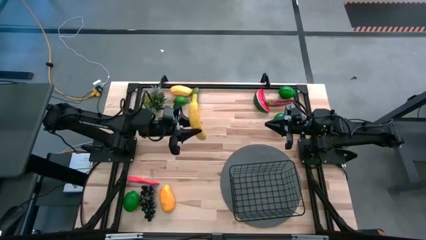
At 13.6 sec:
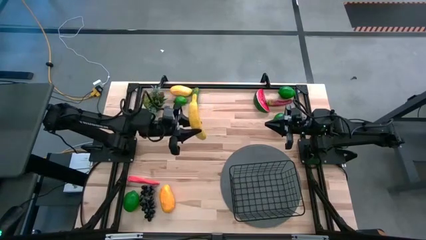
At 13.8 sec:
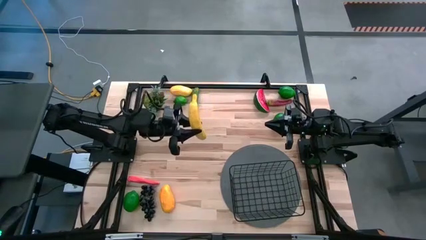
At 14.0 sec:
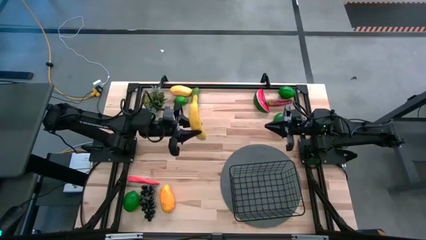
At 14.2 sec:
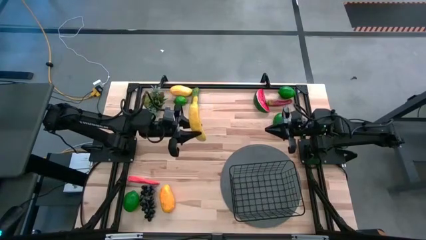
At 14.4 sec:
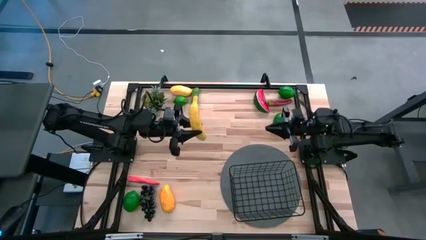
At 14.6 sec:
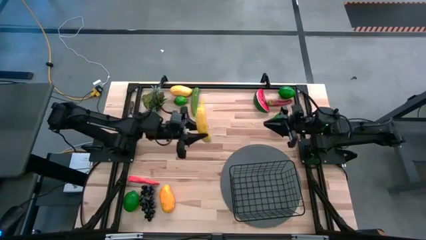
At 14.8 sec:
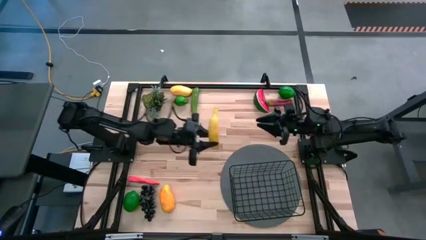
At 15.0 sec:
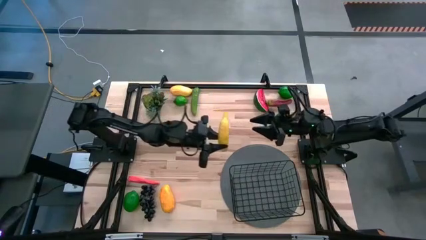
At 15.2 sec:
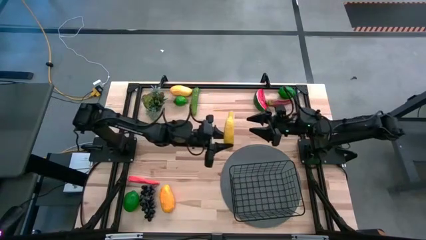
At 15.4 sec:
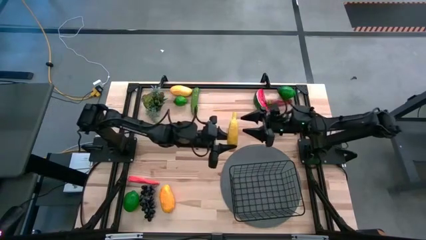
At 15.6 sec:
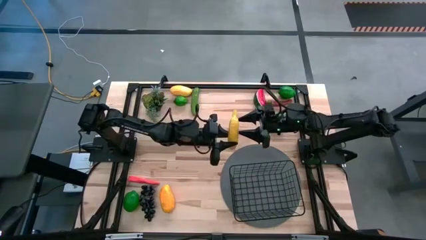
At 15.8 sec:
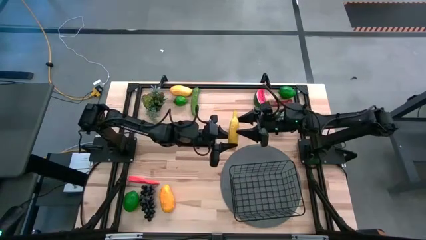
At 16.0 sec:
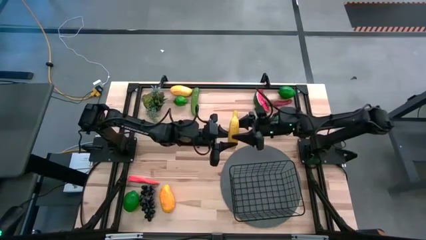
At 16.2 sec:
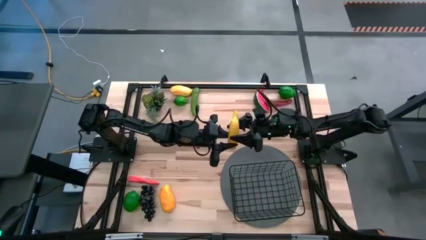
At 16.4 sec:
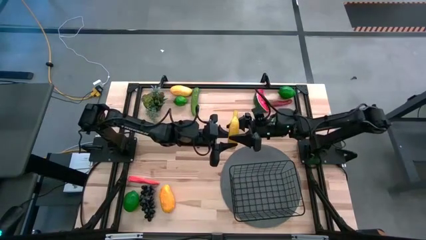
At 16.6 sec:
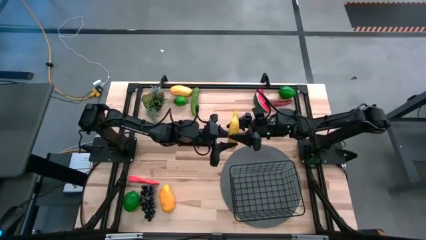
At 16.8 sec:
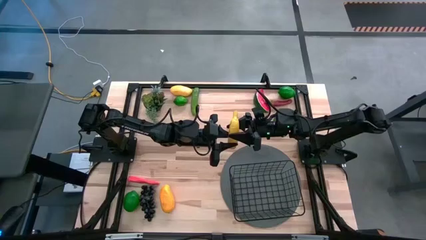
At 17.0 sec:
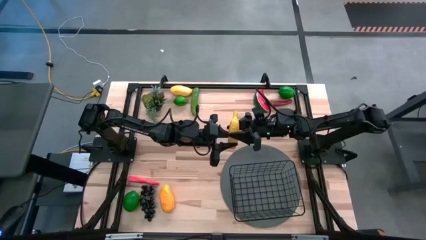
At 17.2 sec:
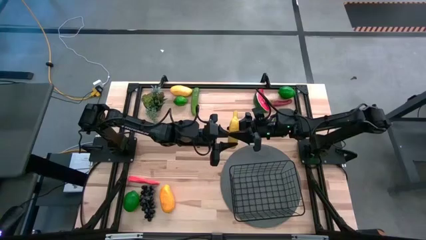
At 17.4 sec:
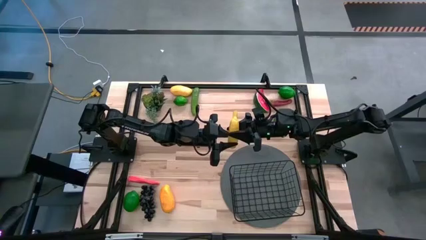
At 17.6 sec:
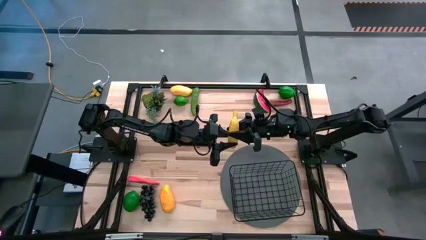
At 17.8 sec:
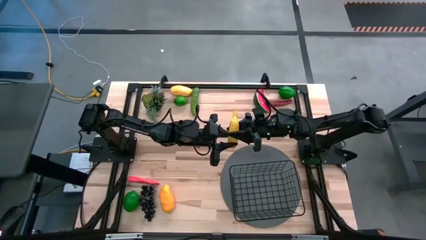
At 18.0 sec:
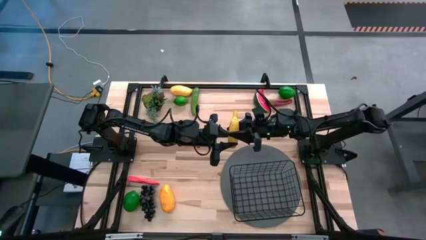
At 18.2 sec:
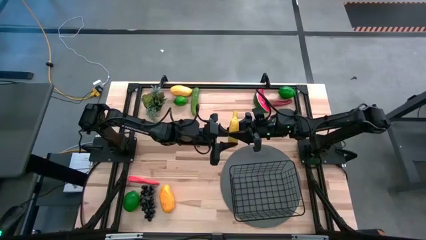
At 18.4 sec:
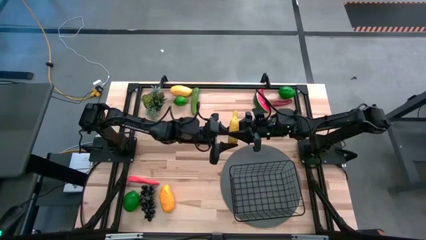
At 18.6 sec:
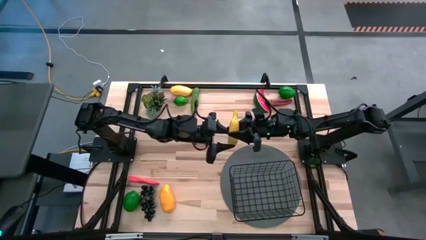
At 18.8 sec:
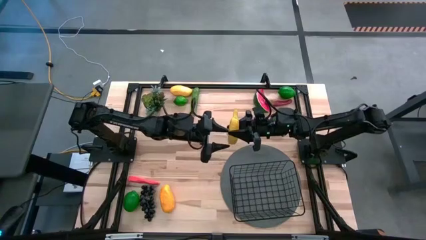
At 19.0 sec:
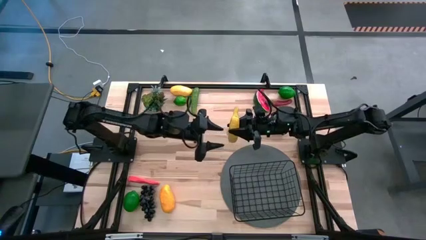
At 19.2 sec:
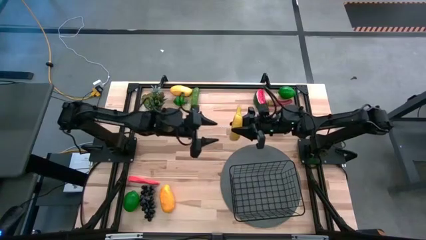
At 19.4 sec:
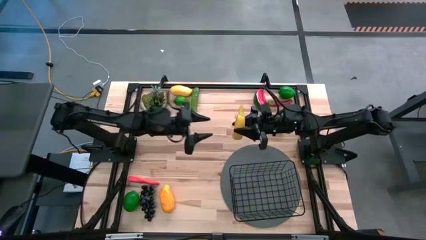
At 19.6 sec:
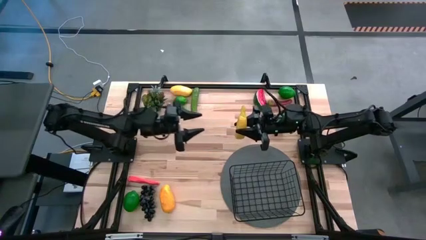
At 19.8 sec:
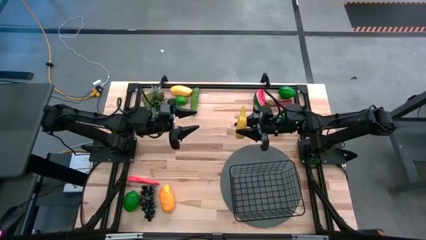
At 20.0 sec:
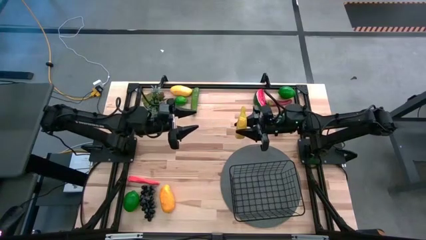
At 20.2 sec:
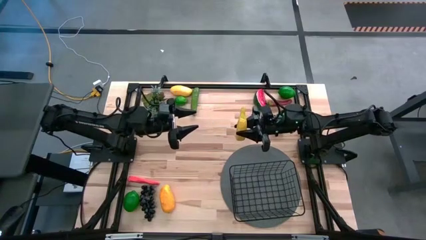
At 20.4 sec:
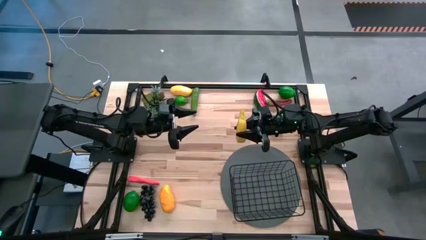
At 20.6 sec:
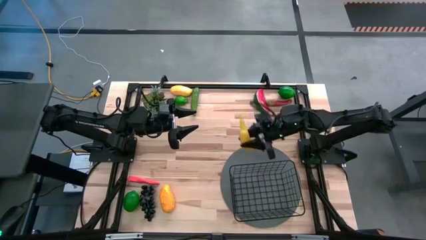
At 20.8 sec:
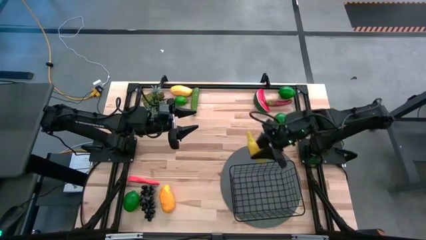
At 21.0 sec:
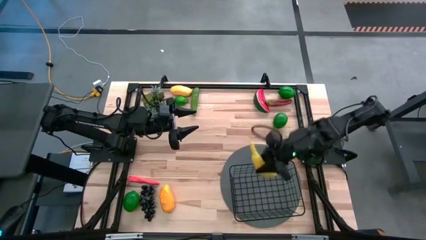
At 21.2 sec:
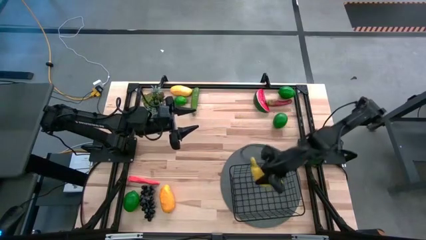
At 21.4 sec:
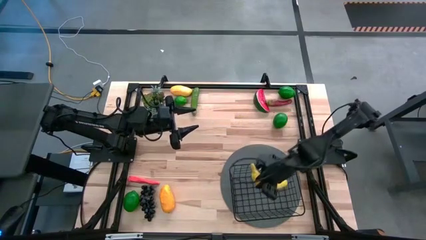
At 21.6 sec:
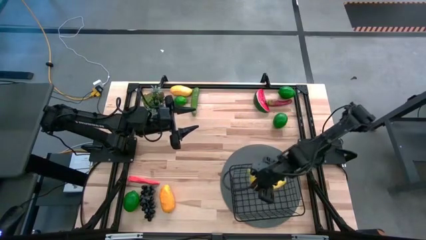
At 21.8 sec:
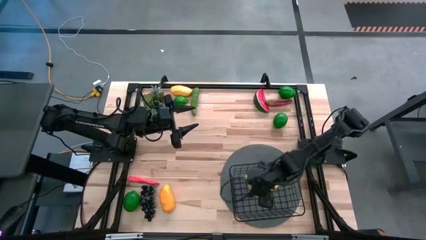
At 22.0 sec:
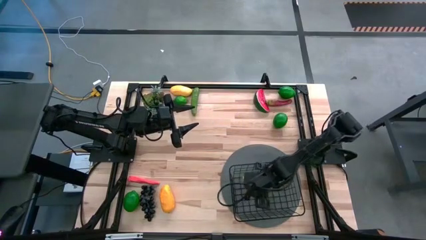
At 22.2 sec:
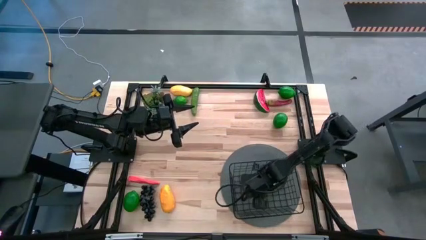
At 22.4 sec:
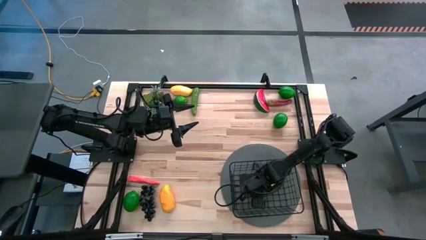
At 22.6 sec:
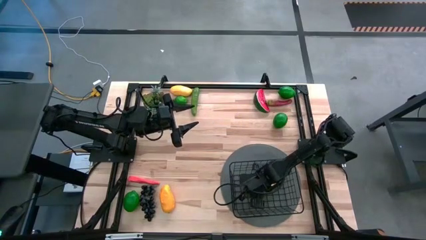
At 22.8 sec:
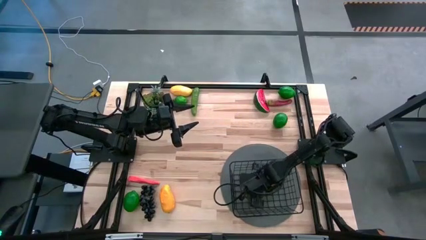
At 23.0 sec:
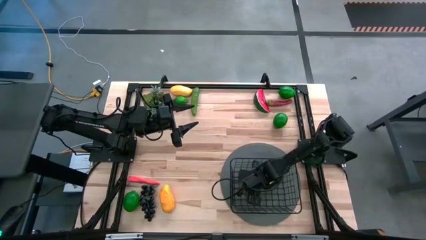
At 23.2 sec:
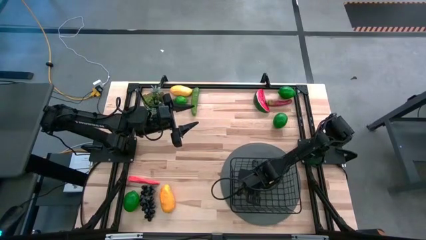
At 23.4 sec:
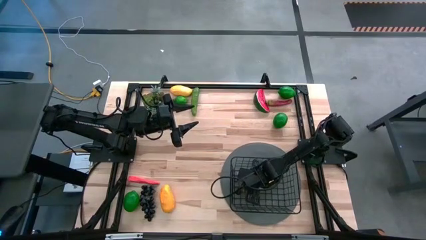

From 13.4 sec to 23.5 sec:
Task: Build produce basket
Put the yellow banana into the black basket

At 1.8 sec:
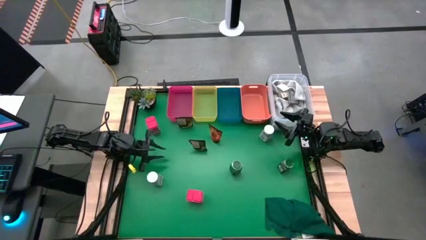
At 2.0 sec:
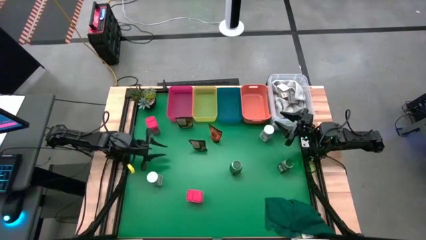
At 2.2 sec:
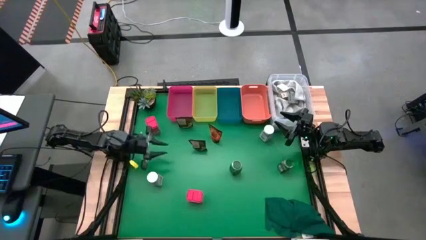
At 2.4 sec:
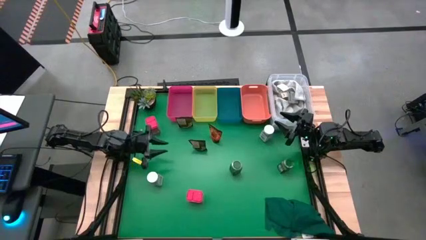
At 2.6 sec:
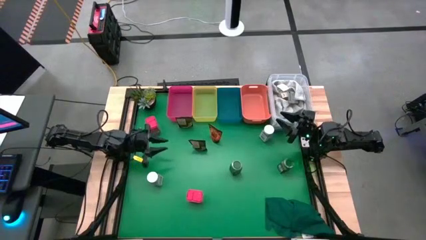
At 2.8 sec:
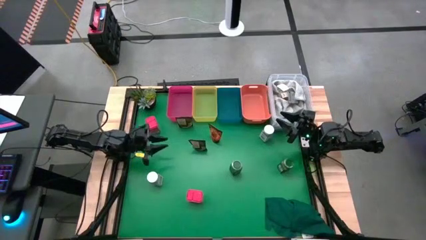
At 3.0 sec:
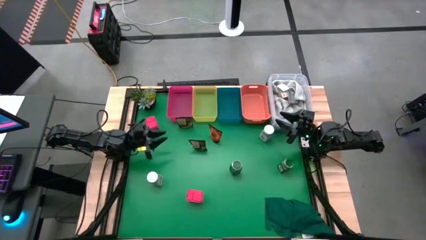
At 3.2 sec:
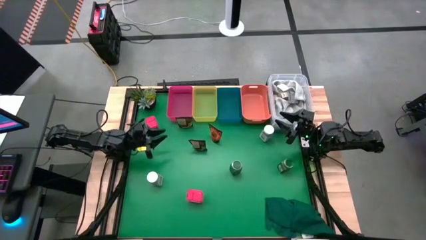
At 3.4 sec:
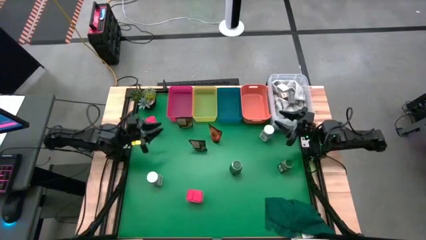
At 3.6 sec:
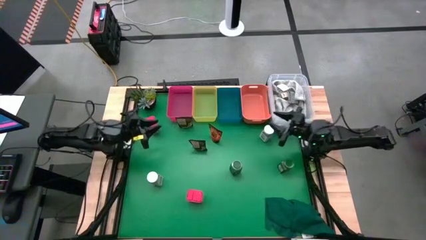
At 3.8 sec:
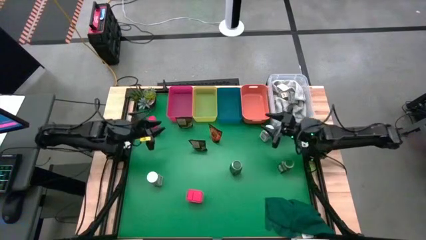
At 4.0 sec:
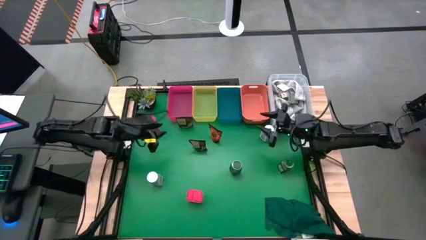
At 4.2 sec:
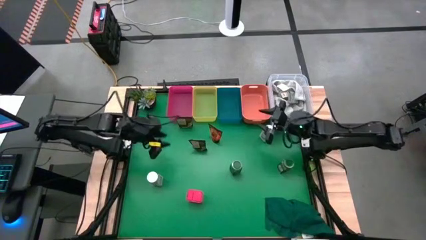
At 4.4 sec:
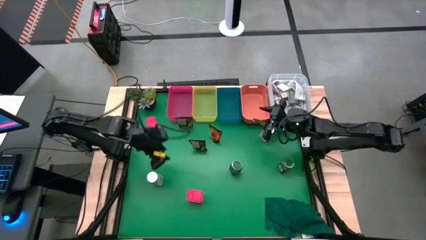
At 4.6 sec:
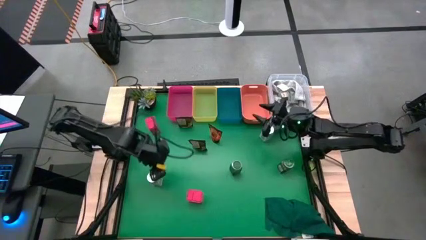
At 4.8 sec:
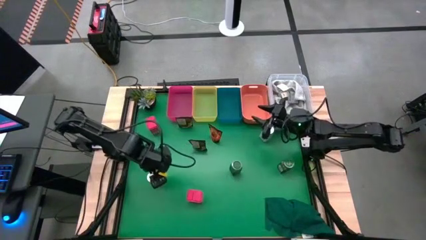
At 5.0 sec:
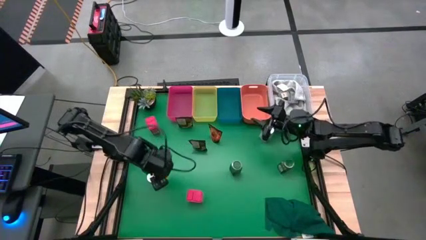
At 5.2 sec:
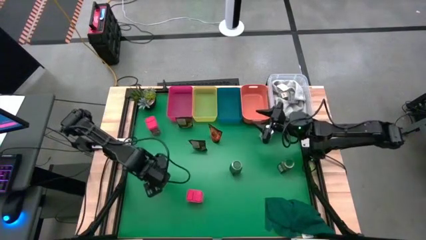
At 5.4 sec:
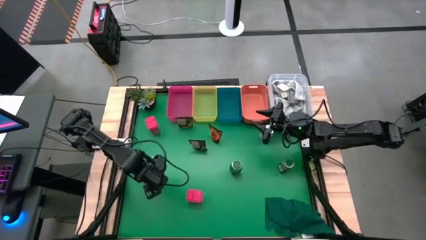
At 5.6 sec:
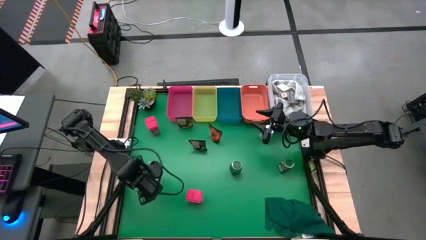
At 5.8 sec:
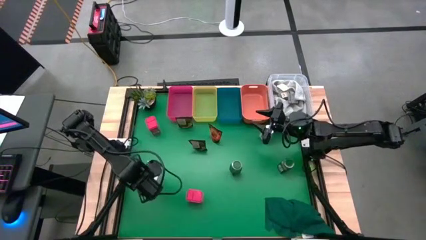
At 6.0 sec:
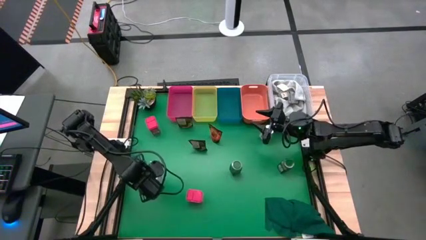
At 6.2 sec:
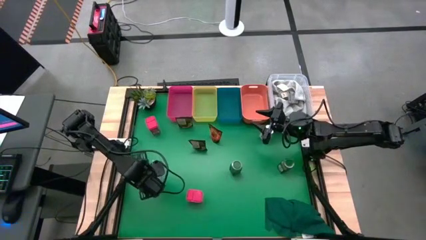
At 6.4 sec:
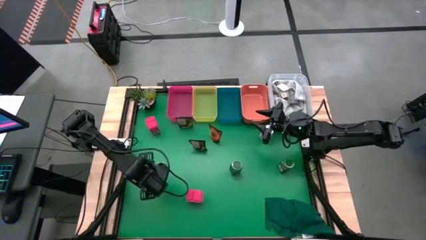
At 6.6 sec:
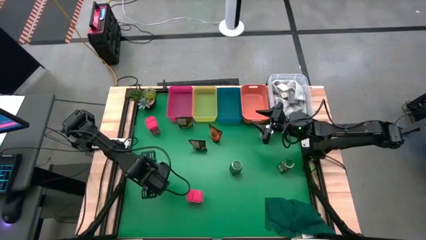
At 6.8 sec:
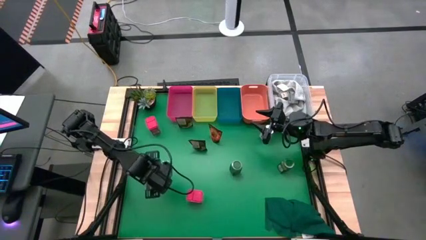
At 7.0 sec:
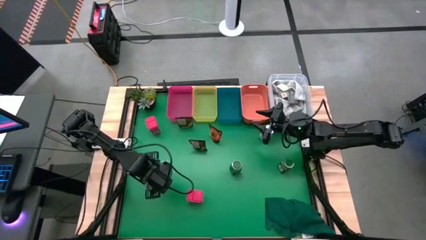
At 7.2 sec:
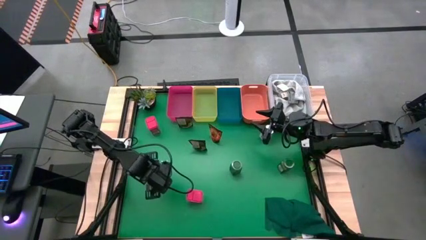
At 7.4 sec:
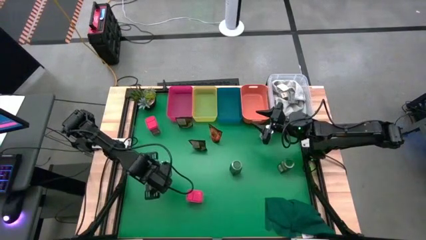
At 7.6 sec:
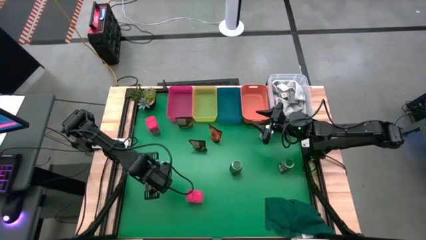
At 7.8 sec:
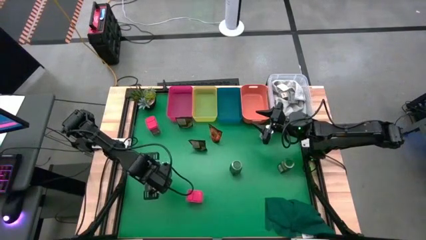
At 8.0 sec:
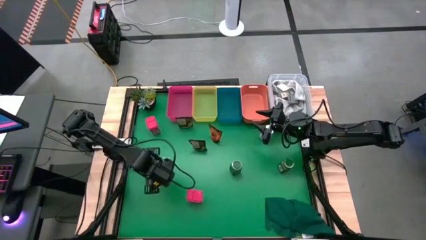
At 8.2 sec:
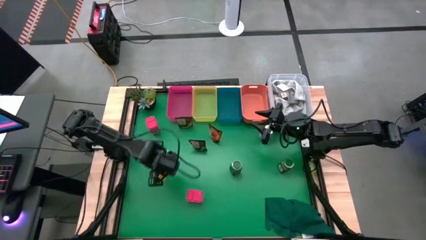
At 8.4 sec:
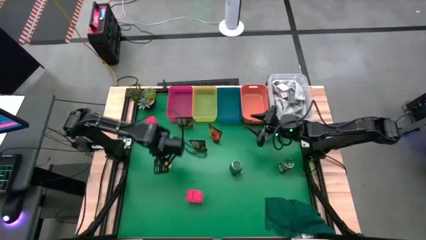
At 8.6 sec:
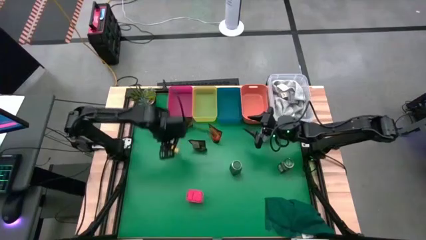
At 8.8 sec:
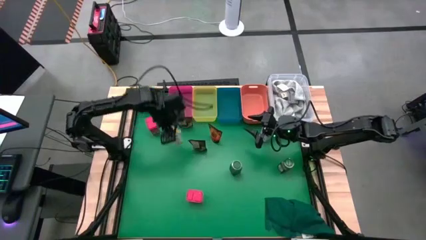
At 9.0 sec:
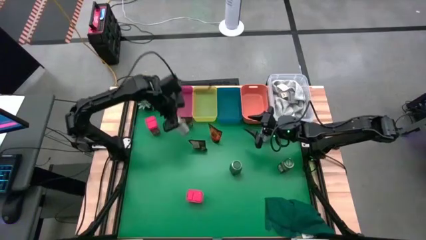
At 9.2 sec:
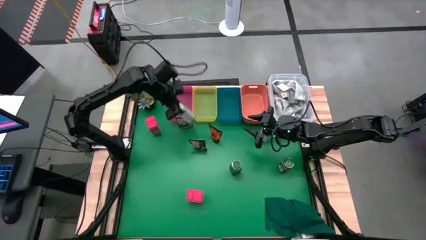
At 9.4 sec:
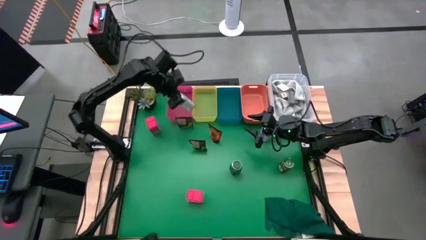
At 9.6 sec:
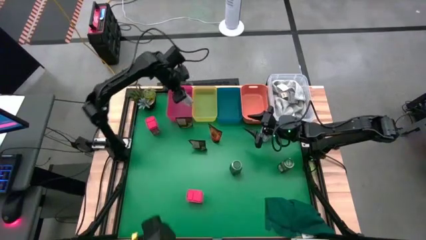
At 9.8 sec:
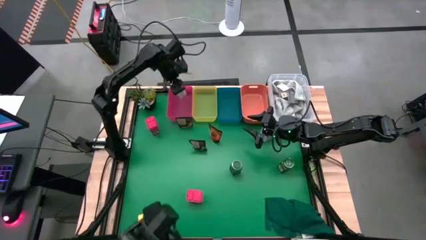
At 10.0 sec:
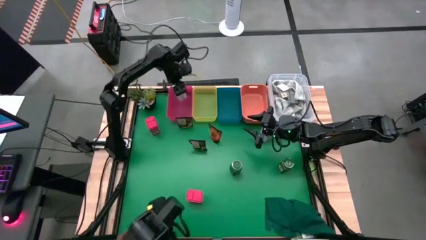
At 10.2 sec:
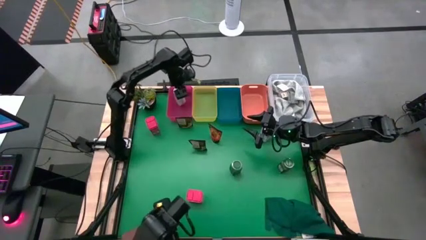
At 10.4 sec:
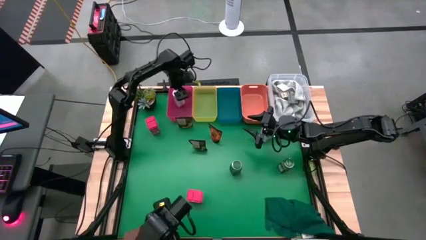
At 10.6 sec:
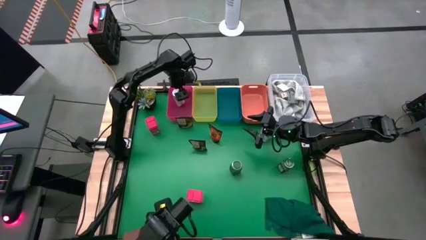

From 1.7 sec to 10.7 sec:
Task: Sort spices by type
Put the bottom white seasoning bottle into the red bin
